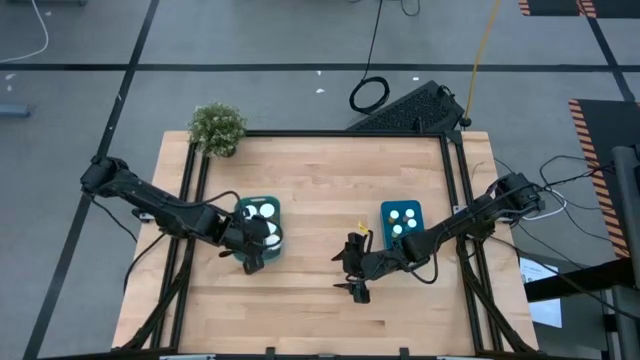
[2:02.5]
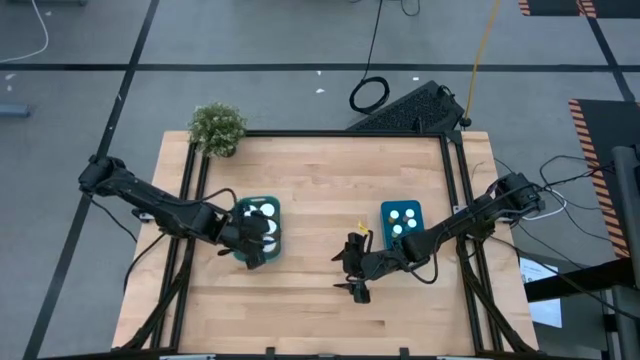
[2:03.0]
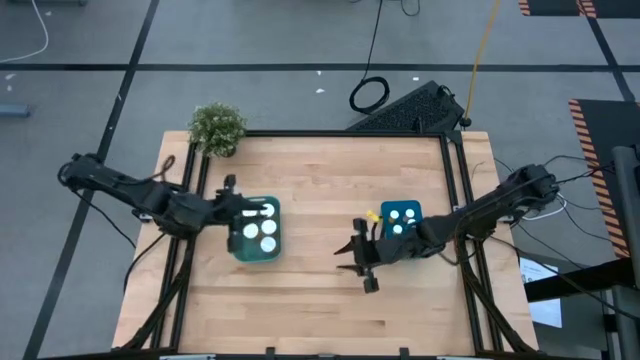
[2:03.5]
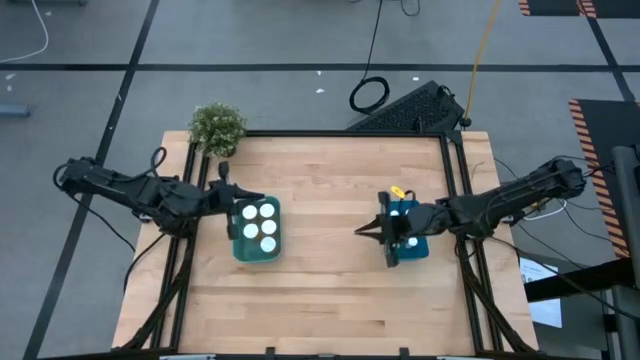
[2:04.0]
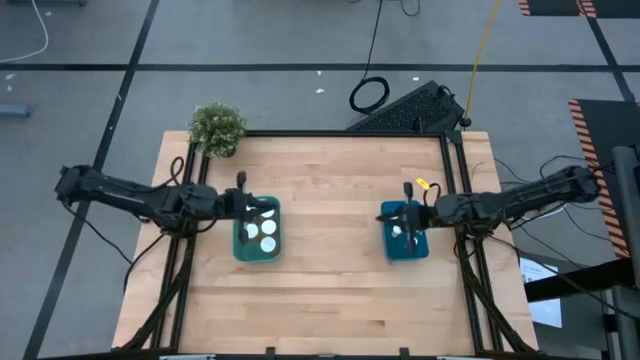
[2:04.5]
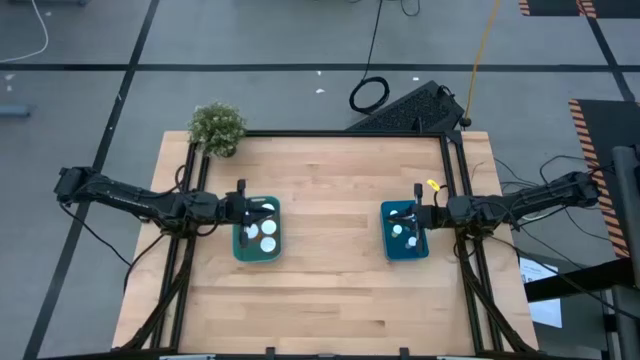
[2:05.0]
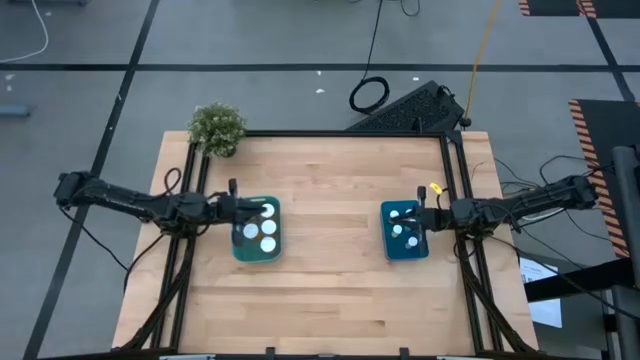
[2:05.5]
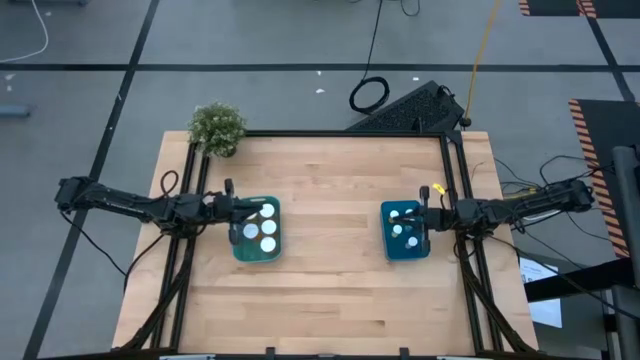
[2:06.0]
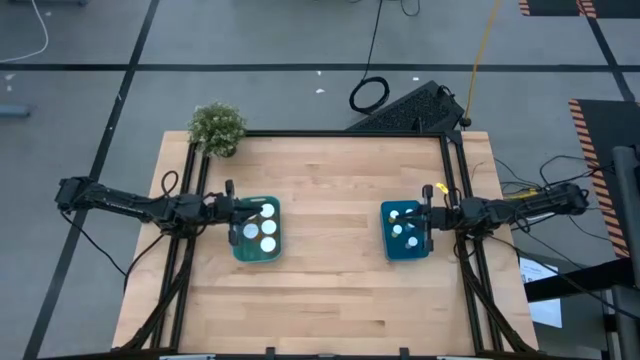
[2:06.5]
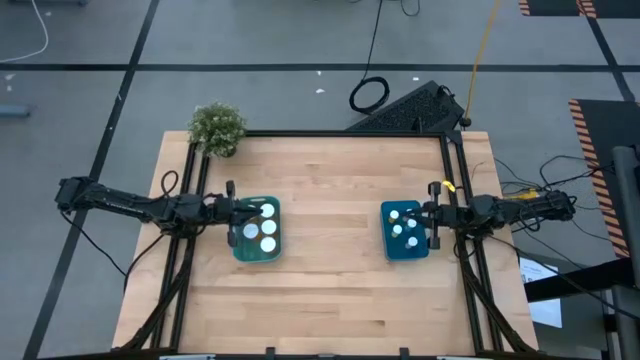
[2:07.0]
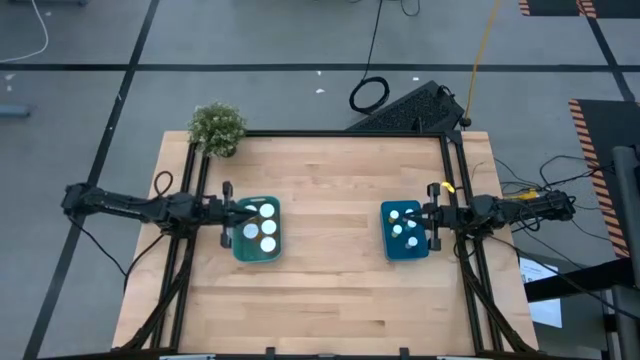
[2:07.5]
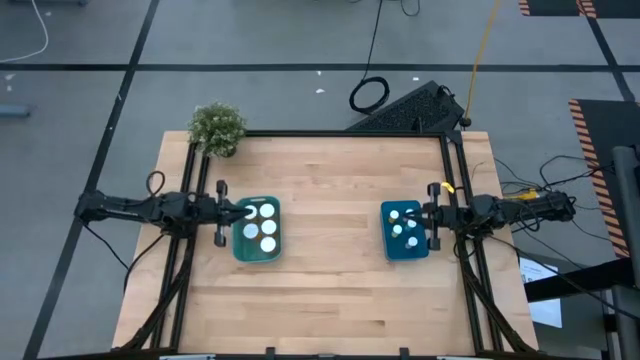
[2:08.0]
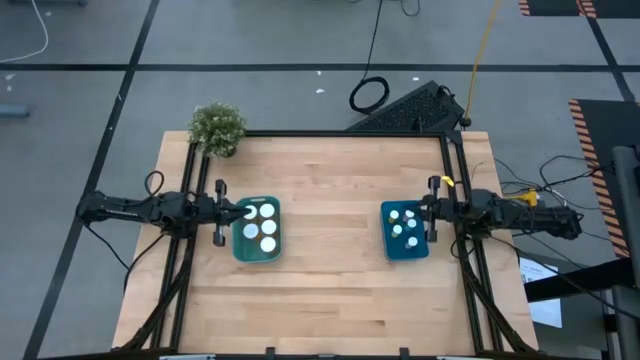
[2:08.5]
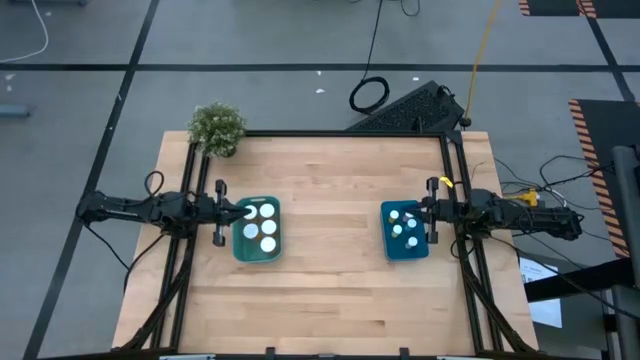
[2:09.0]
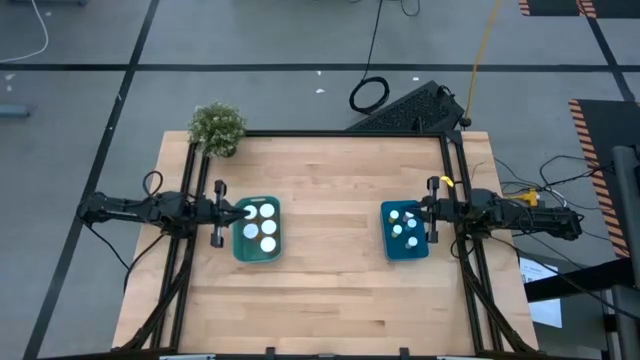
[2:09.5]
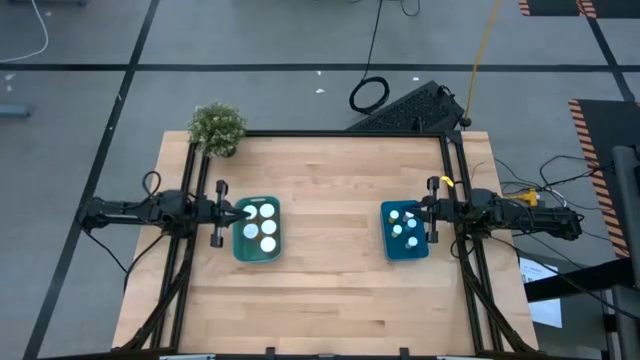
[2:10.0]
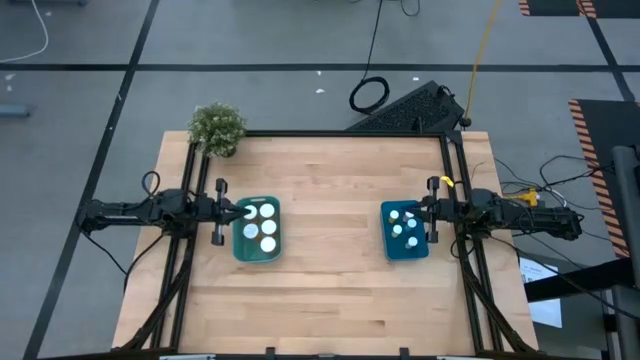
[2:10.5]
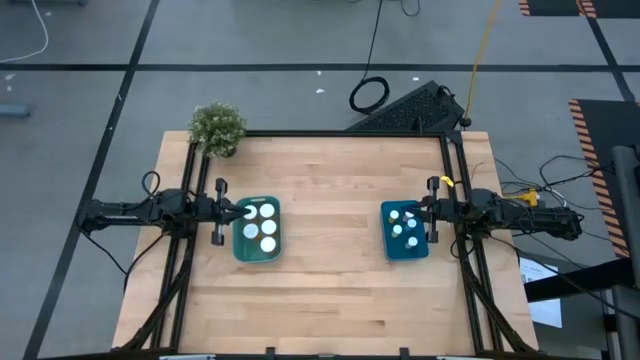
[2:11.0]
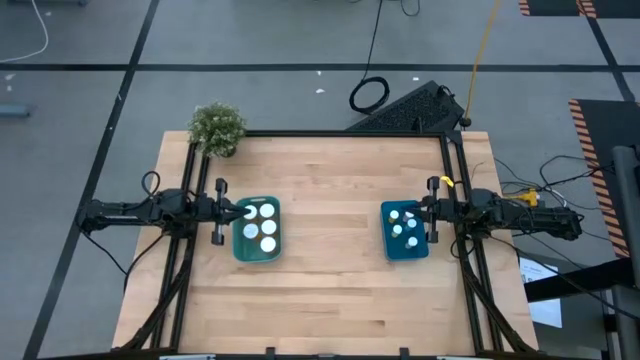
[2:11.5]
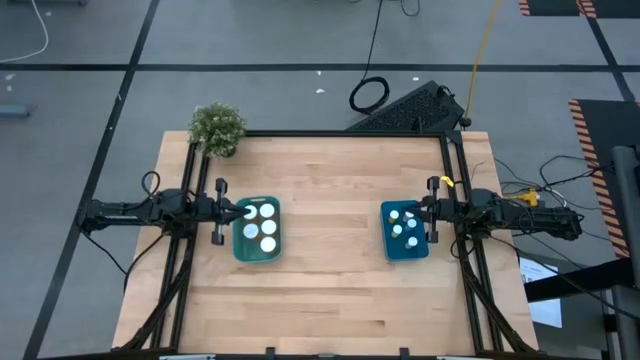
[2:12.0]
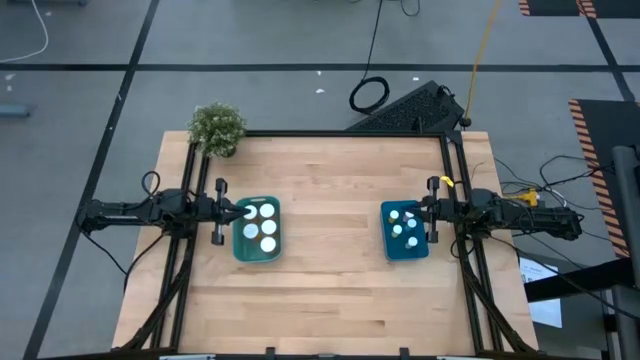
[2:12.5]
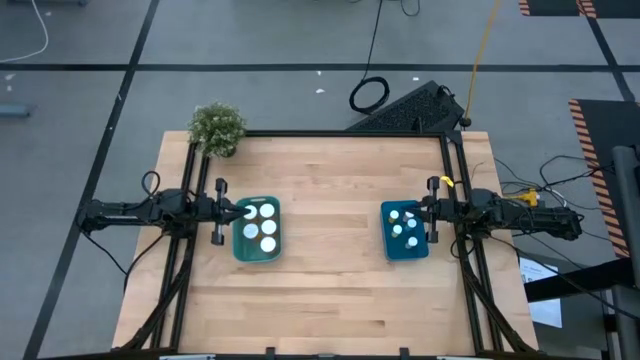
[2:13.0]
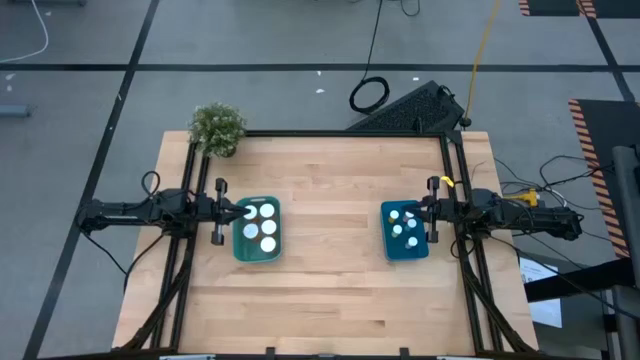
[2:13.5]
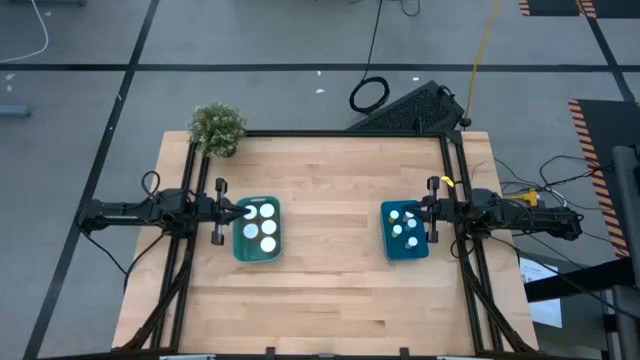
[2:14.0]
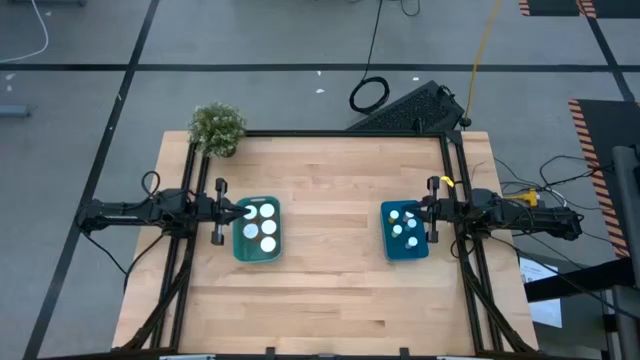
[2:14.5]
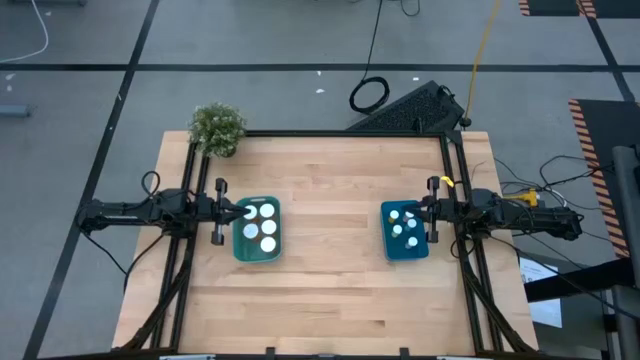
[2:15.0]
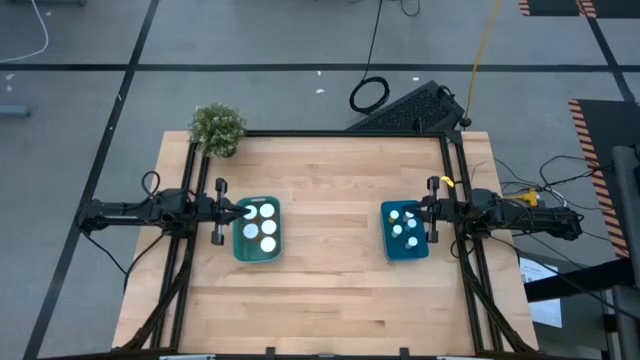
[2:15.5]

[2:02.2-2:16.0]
Task: Pick and place medicine bottles into bin by pill shape (circle, oval)
Return to Home Position

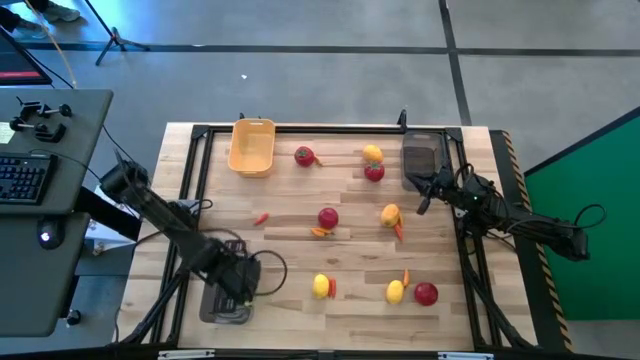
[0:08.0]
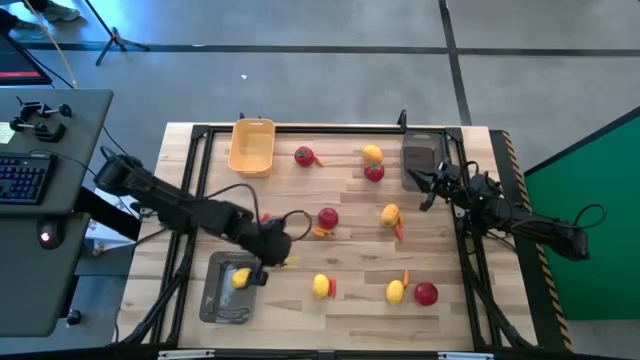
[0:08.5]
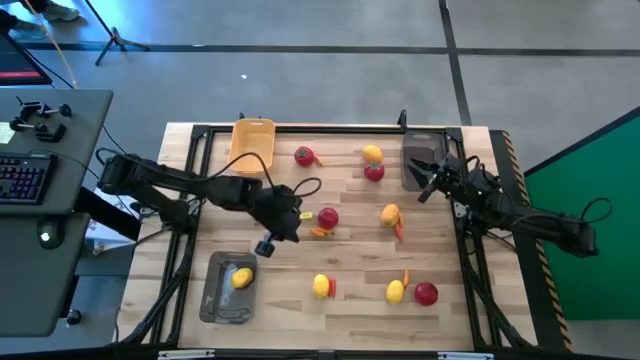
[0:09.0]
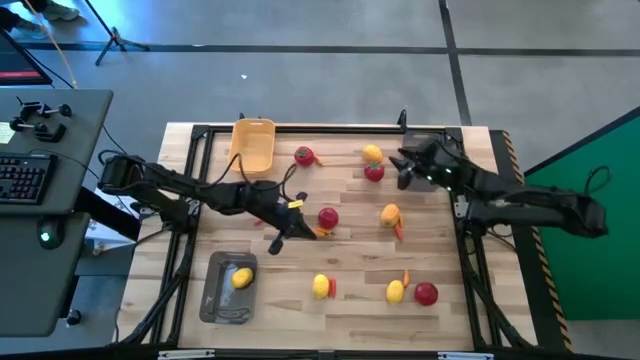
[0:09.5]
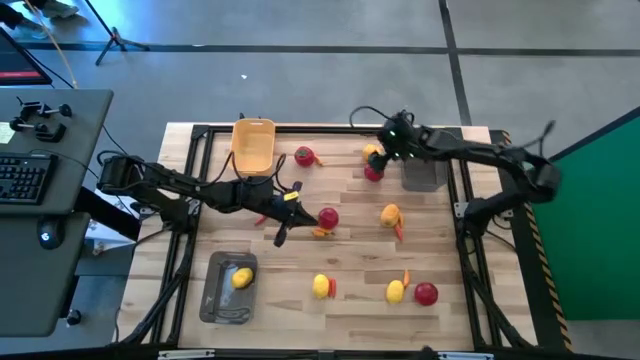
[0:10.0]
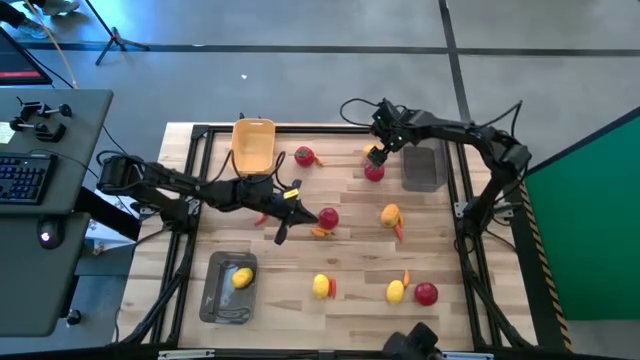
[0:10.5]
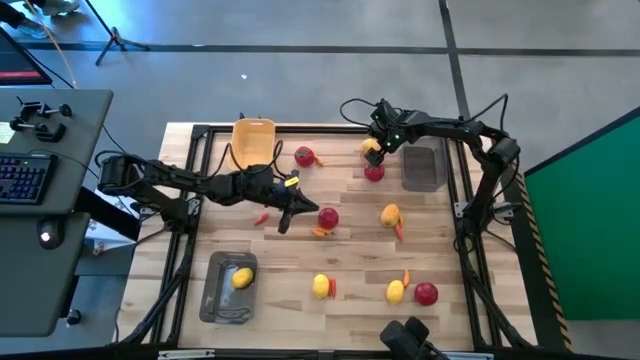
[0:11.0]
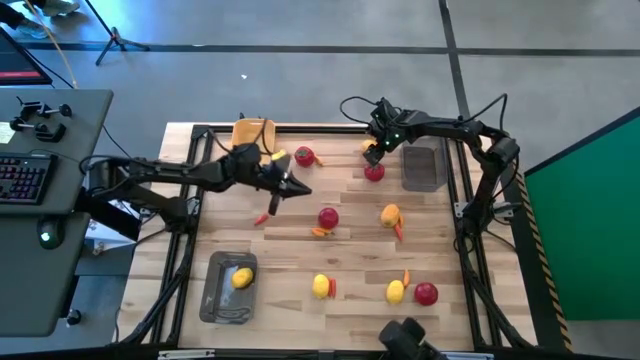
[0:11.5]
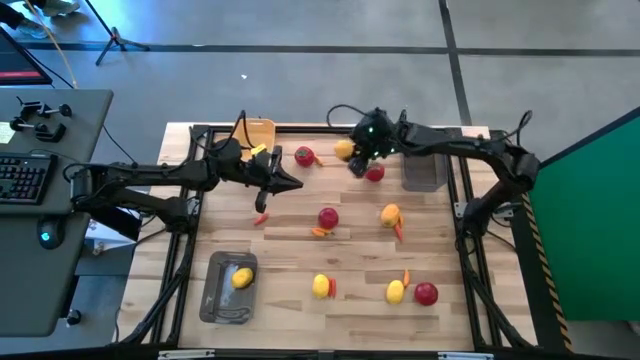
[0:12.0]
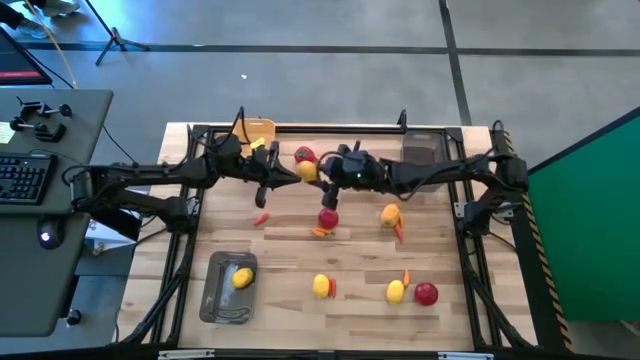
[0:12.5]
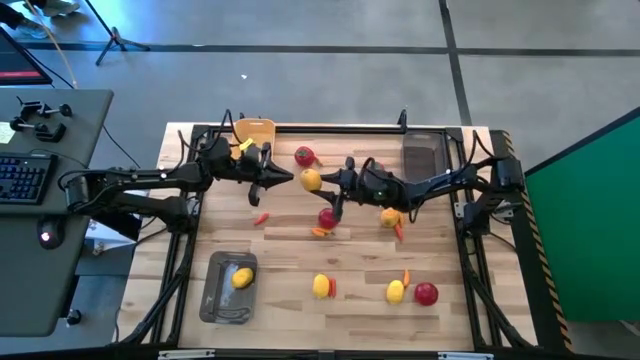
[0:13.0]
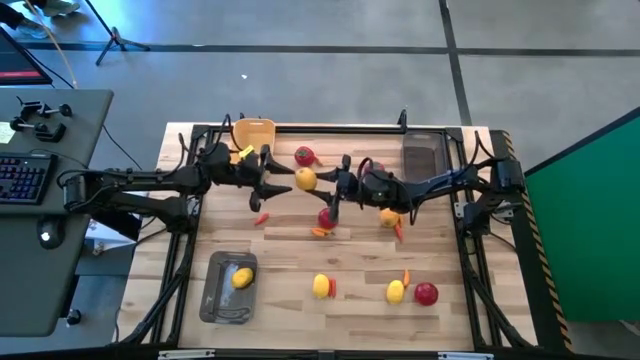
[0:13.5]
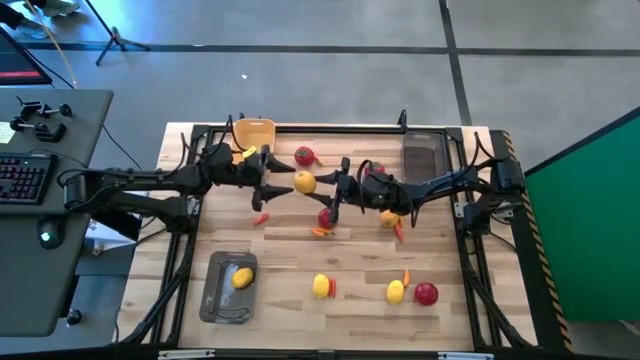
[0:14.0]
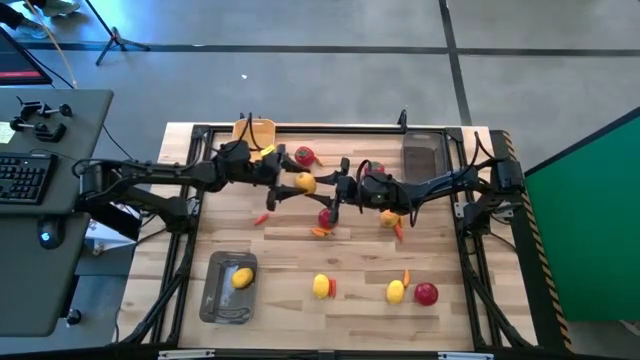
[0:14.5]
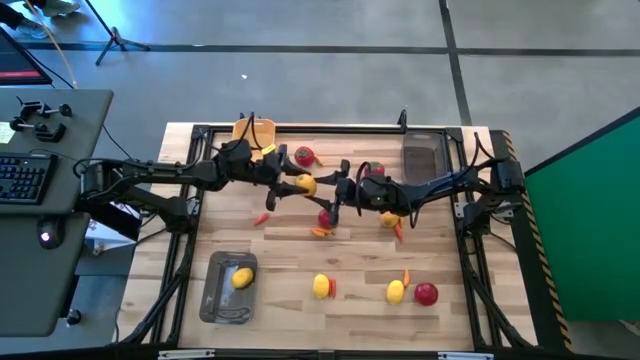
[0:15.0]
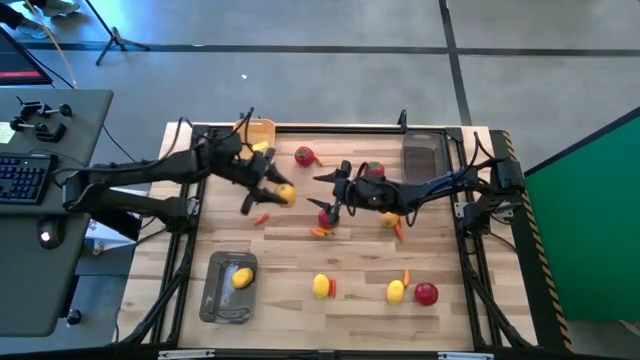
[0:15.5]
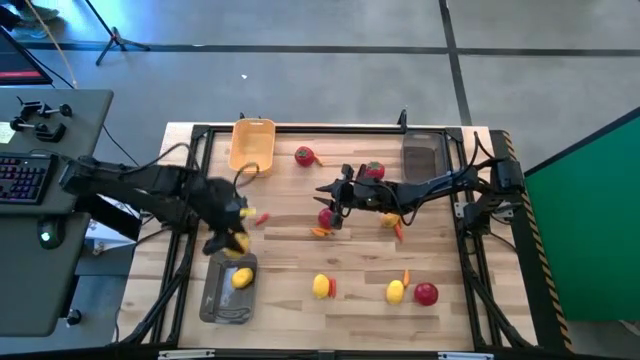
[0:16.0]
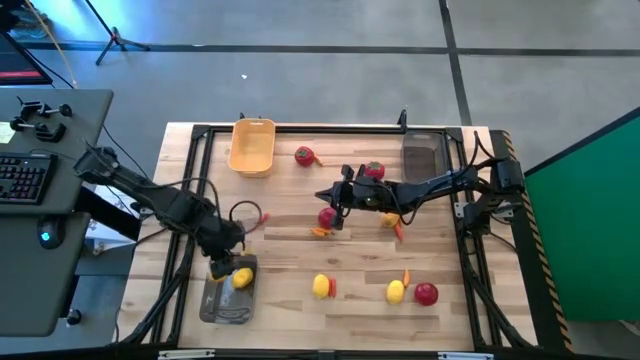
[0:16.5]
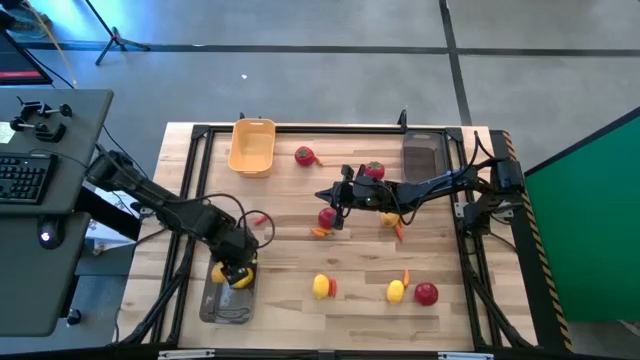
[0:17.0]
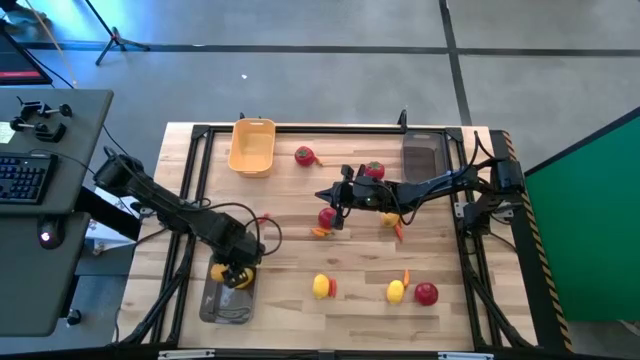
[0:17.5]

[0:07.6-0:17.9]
Task: Sort produce into baskets
Put the lemon into the bottom gray bin
